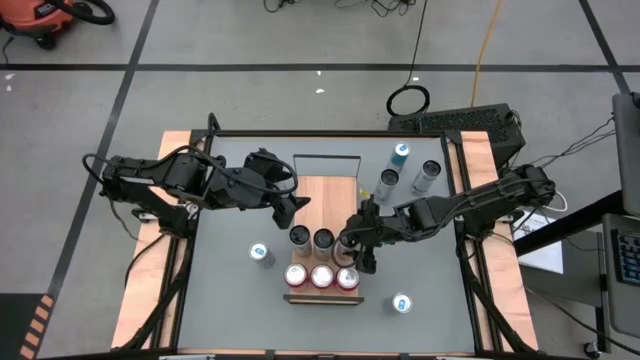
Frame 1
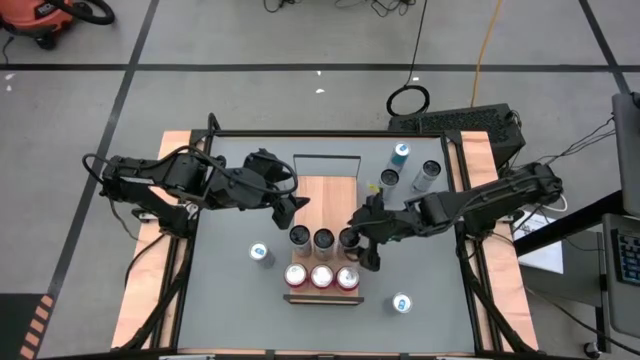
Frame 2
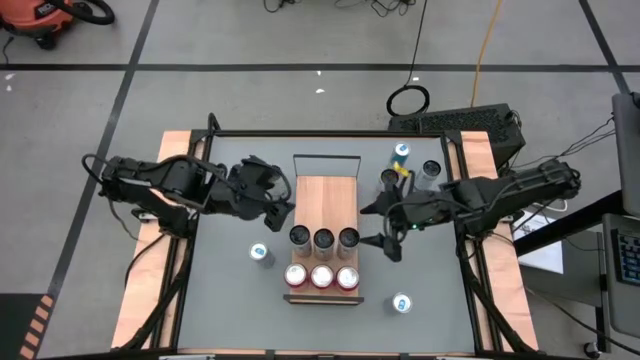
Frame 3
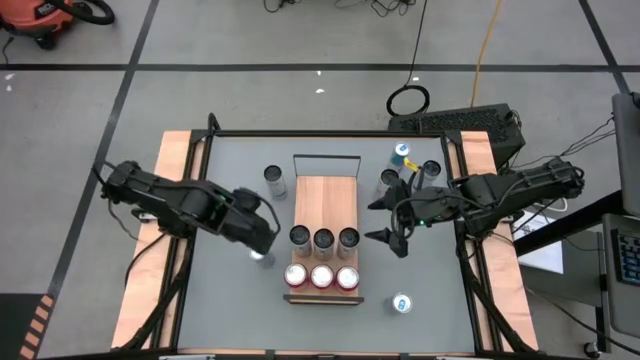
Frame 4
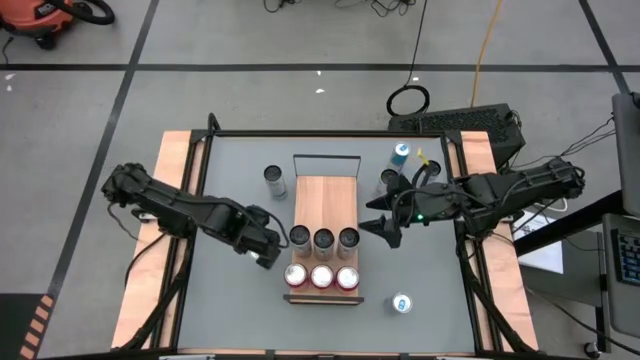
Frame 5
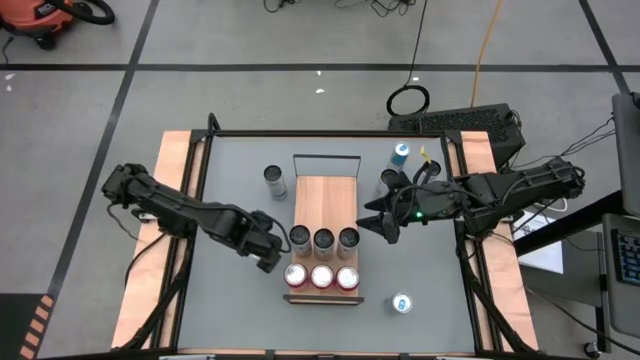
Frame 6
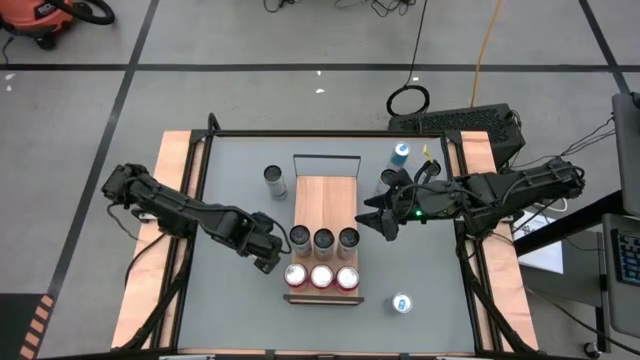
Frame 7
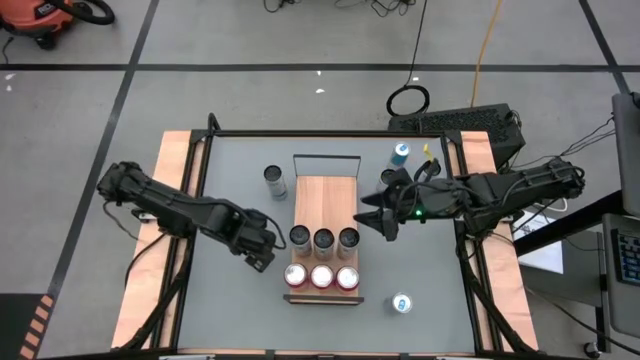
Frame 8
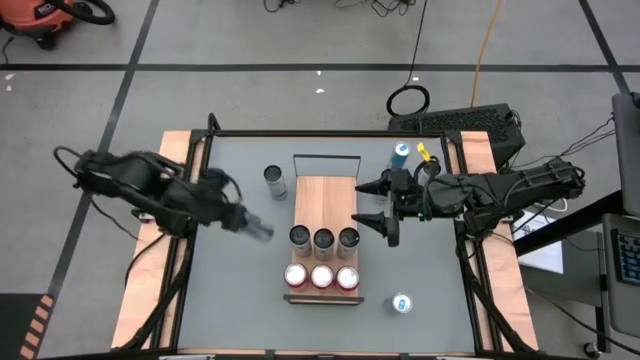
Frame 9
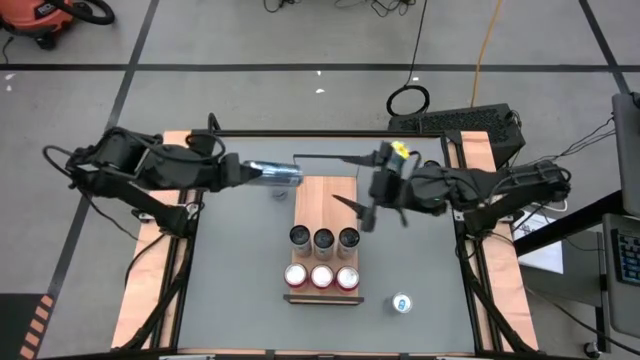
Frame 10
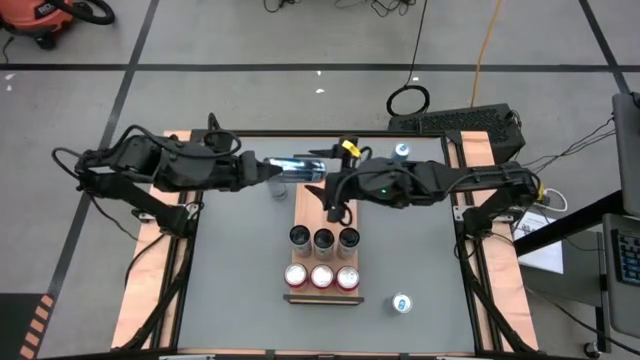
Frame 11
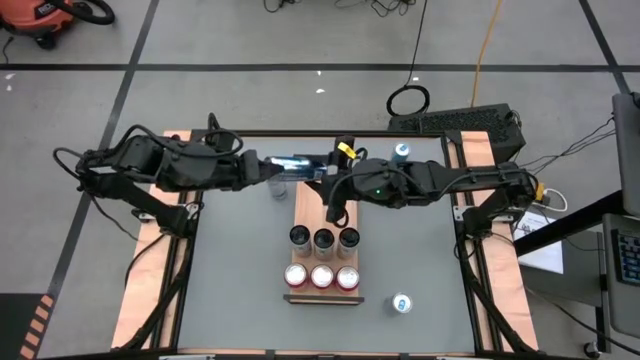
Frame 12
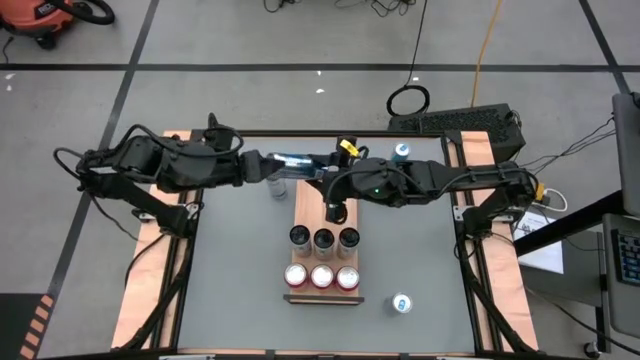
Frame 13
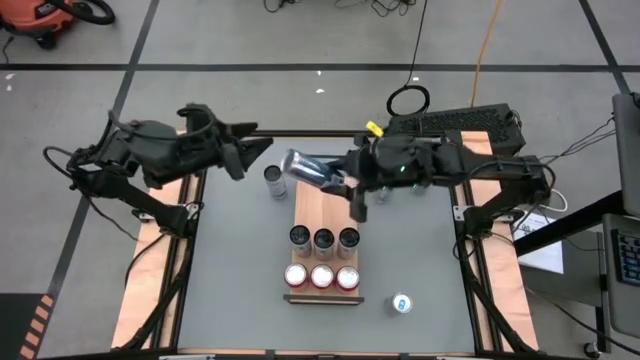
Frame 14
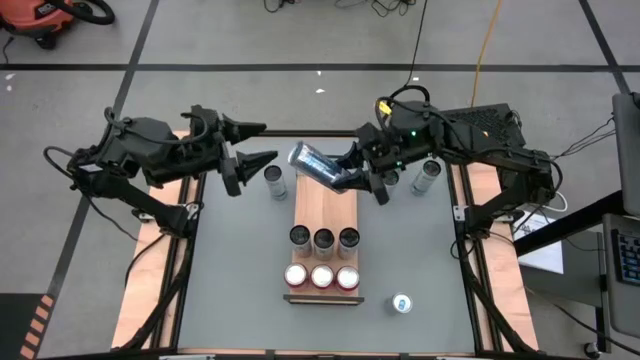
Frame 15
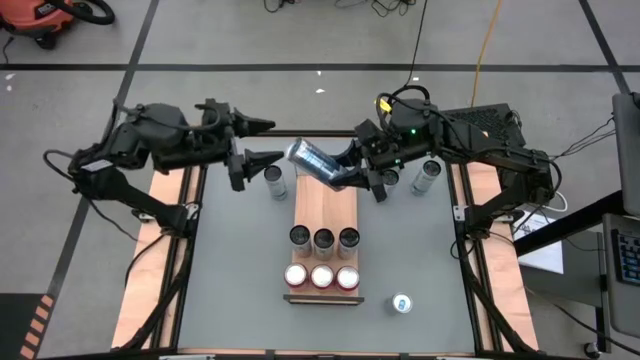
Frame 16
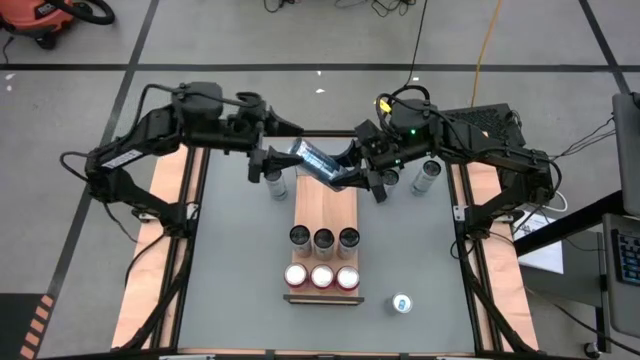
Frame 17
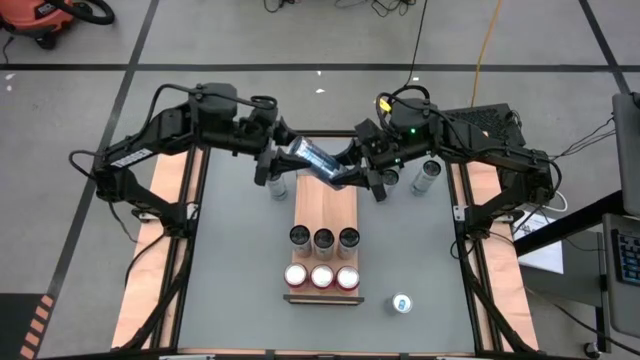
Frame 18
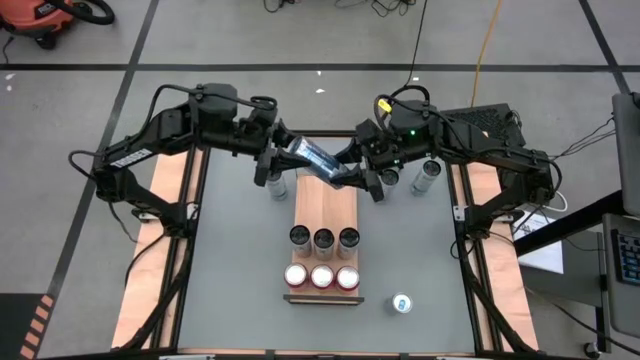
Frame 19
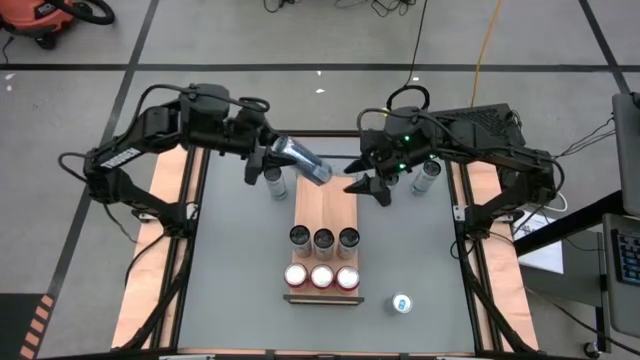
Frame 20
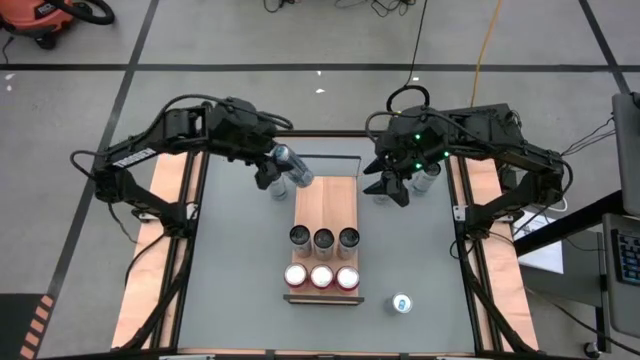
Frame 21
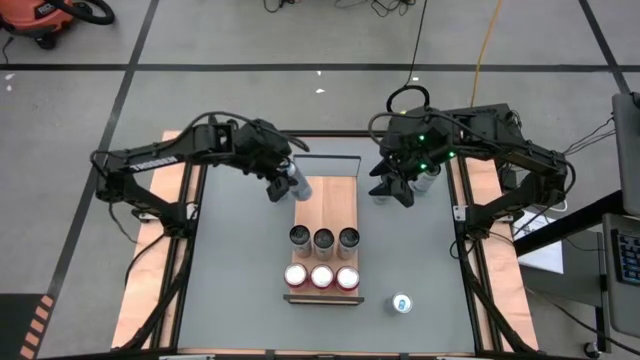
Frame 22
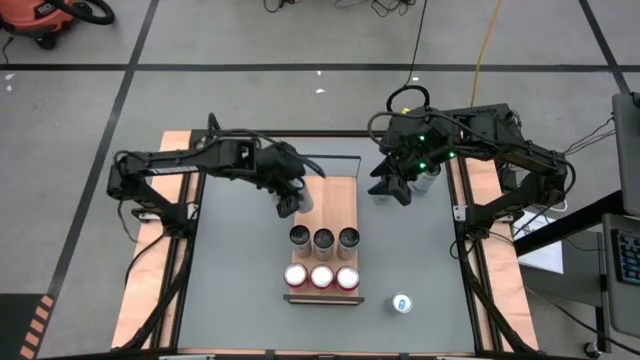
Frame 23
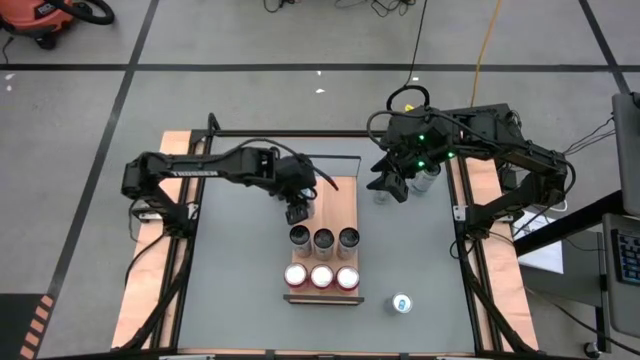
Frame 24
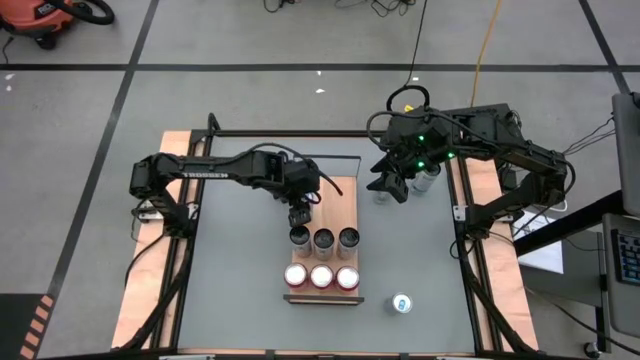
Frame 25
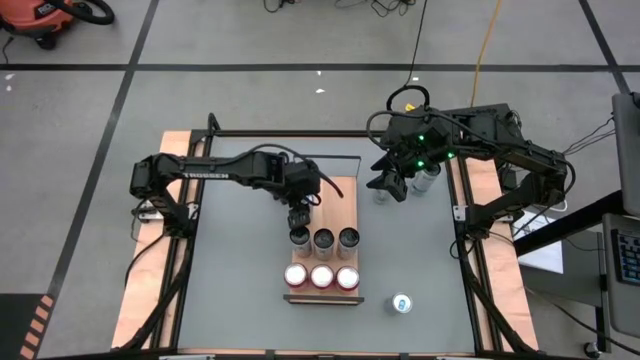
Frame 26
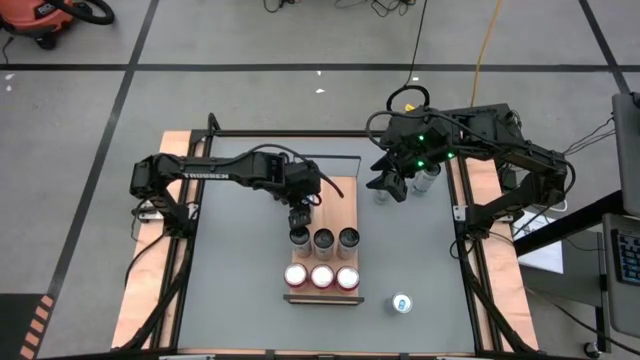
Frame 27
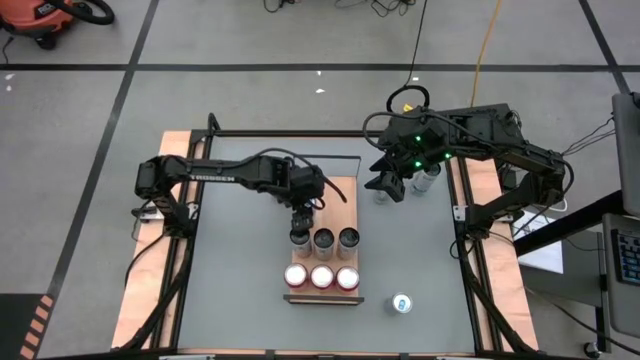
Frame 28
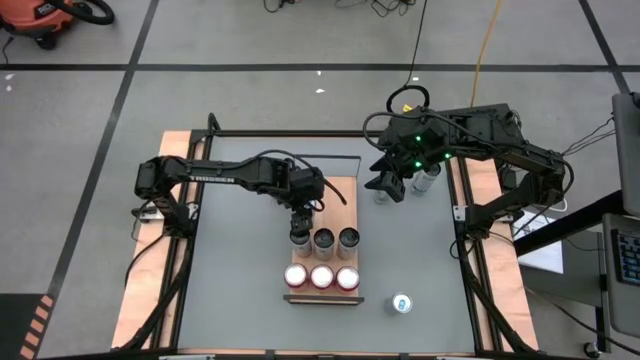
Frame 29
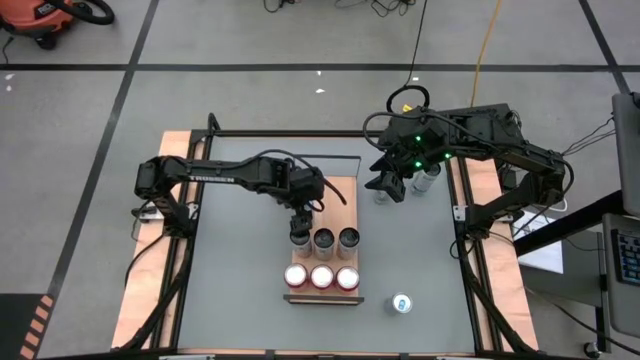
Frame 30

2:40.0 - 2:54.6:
Task: Sort soda cans
Put the left blue soda can on the shelf
